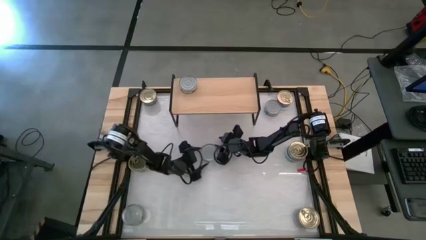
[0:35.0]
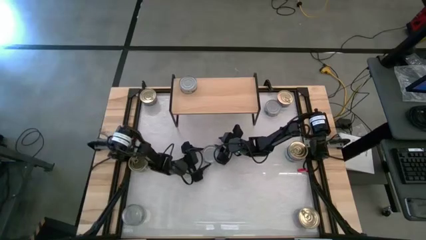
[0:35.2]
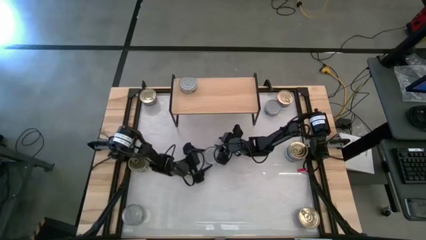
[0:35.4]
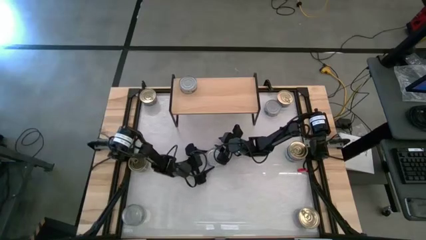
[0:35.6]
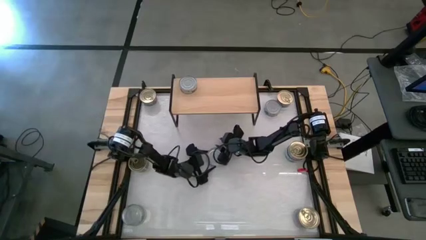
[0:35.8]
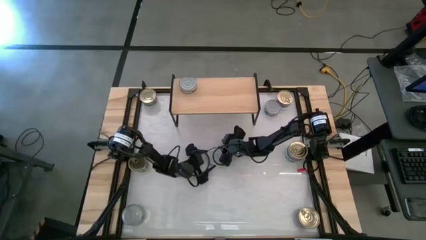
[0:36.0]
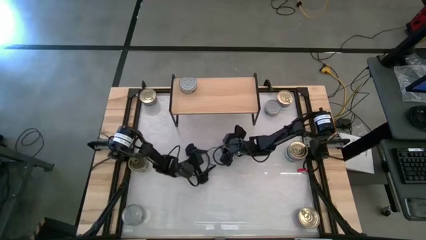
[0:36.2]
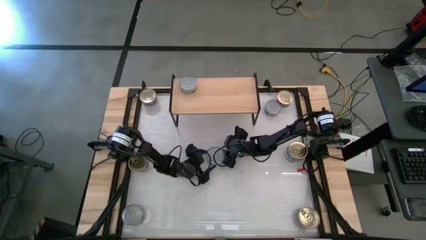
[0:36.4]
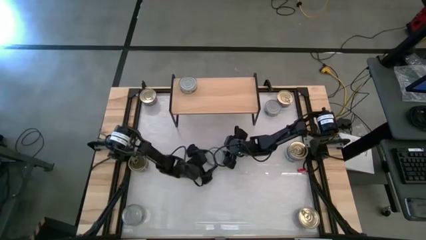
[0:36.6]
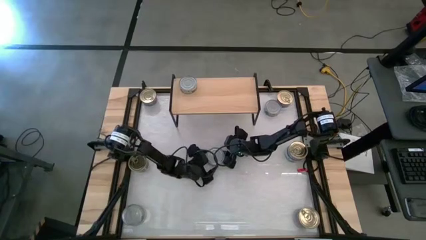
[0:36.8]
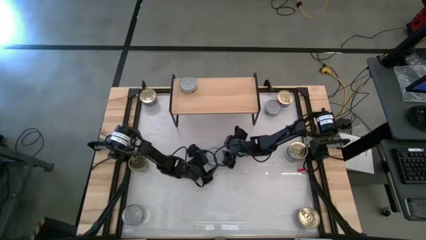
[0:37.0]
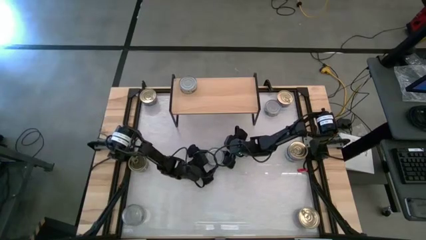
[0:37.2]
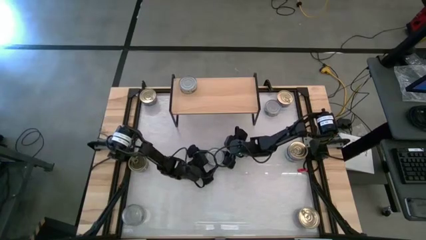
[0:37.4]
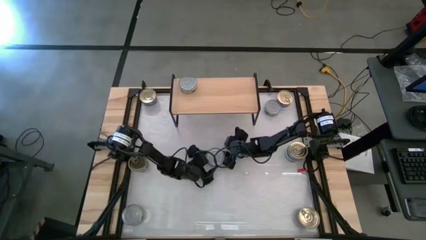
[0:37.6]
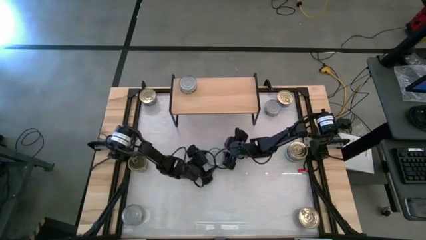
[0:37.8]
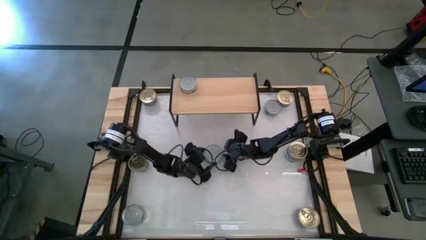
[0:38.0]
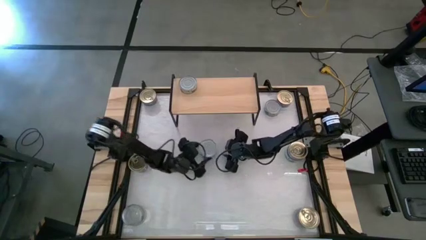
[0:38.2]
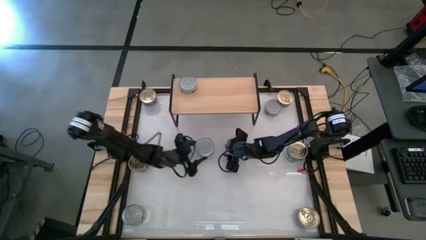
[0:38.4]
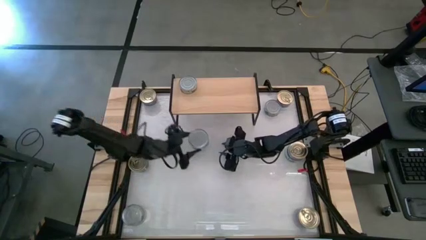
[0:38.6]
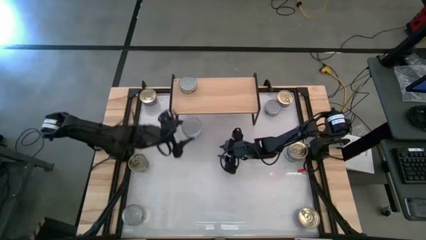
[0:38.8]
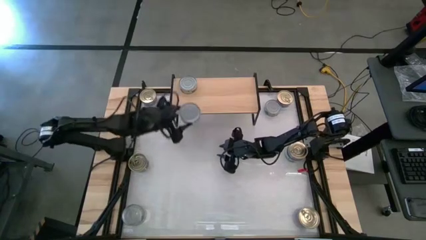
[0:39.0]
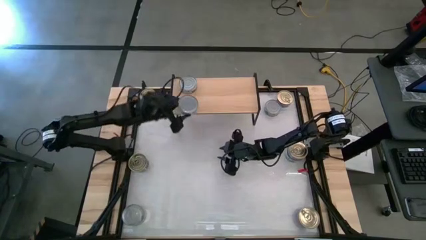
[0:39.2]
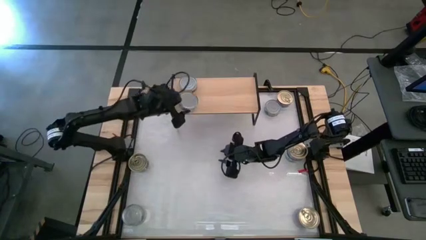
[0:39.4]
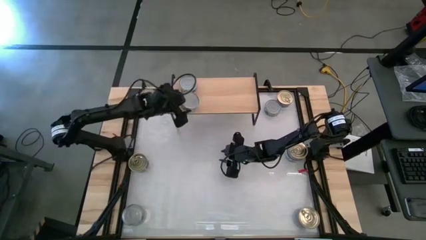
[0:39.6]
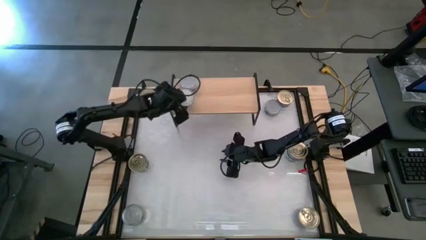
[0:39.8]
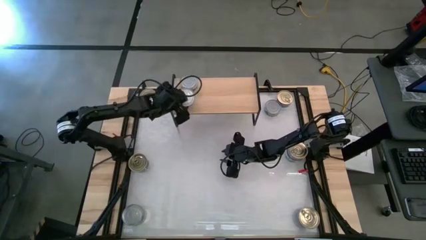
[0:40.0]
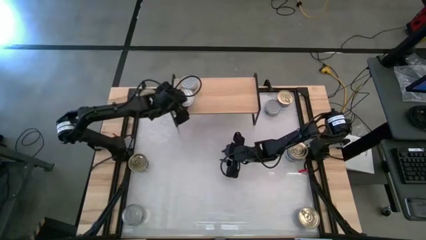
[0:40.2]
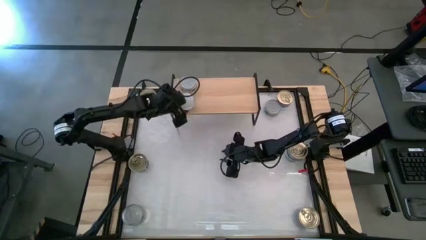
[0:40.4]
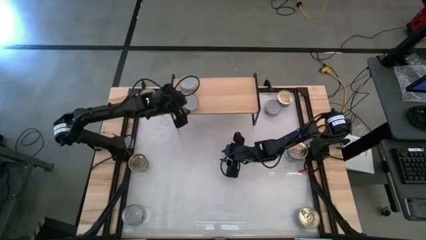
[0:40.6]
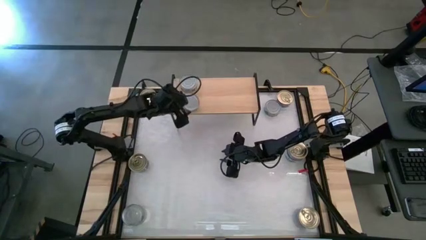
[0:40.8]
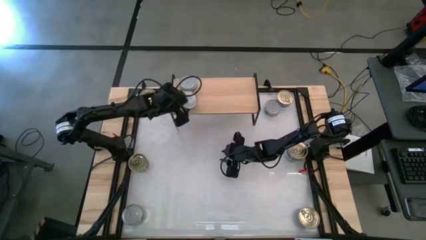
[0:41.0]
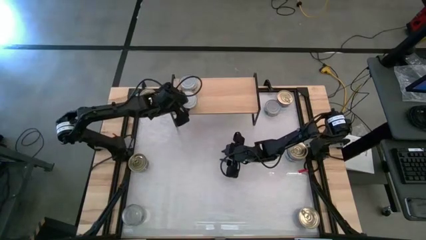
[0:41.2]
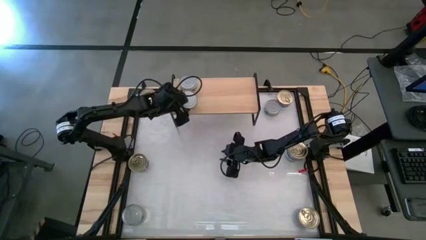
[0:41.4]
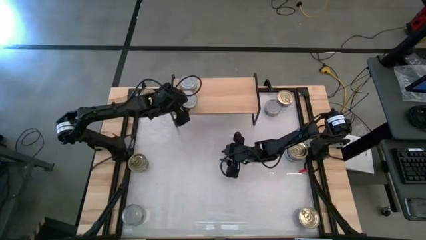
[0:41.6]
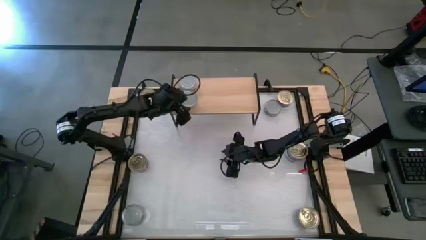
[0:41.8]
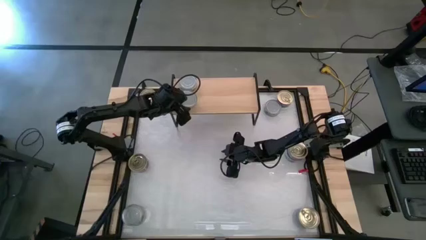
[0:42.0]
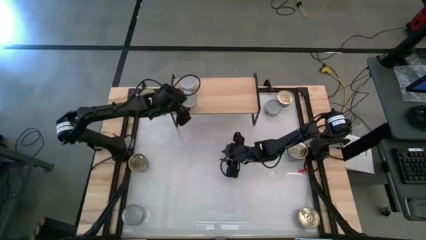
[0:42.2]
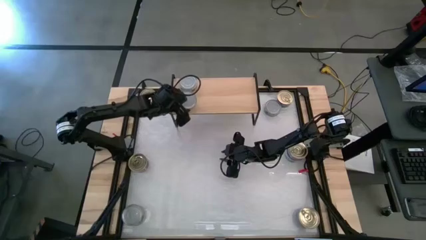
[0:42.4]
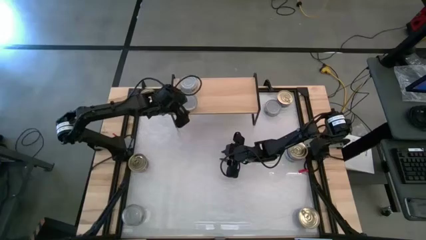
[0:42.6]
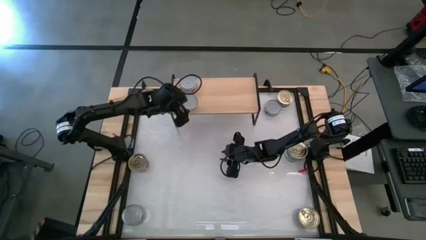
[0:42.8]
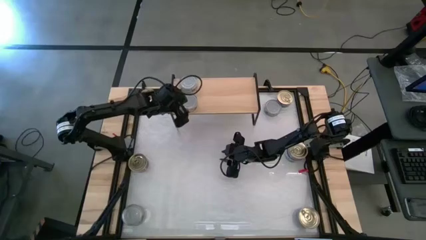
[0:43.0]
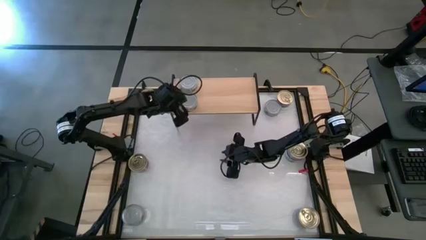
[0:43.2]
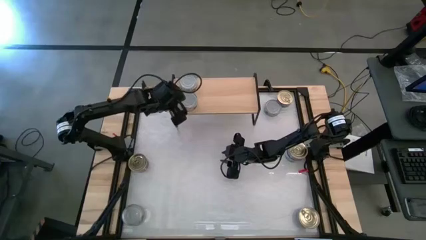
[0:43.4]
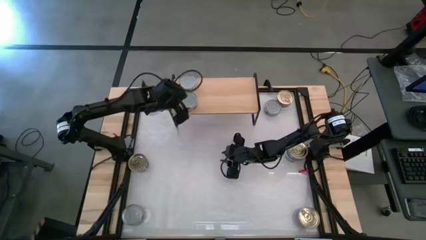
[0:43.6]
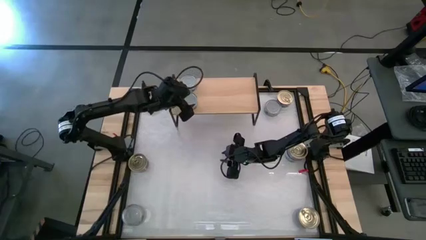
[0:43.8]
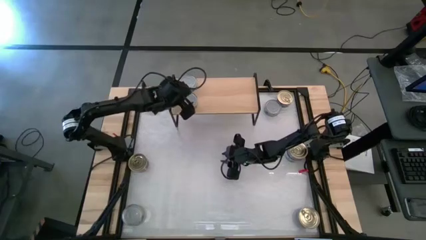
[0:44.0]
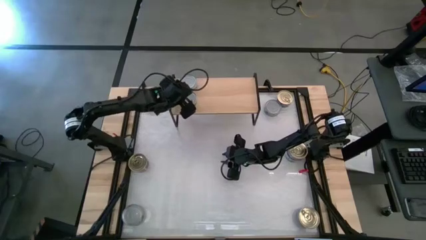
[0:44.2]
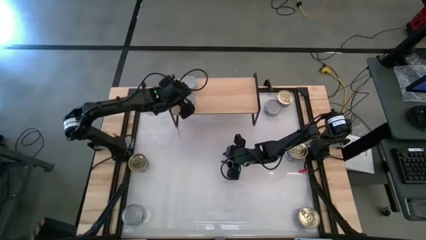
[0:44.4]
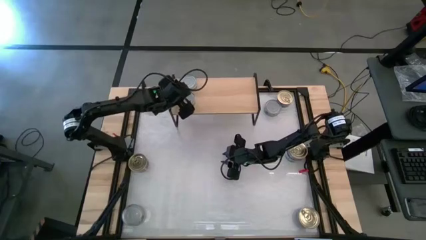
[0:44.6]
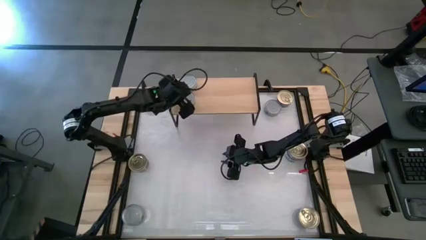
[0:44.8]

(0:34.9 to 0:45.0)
Task: Stack canned seafood by type on shelf
Put the green tuna can on the shelf
